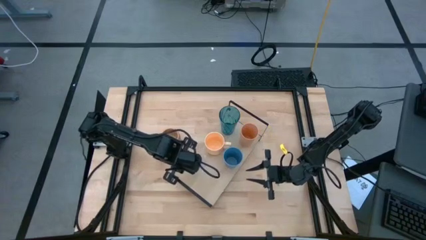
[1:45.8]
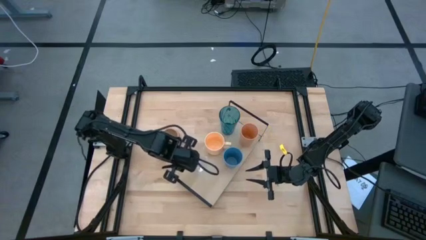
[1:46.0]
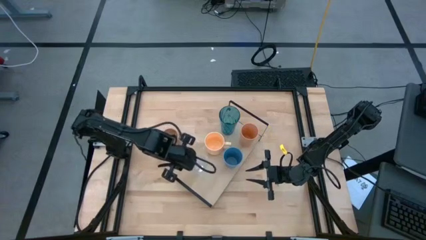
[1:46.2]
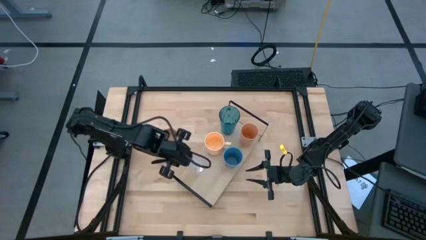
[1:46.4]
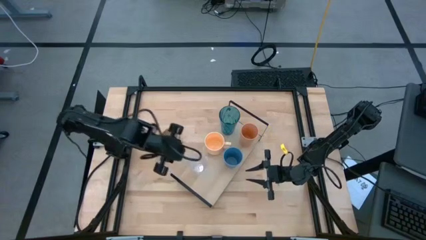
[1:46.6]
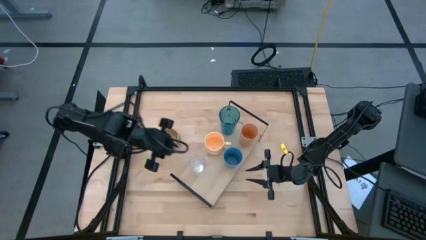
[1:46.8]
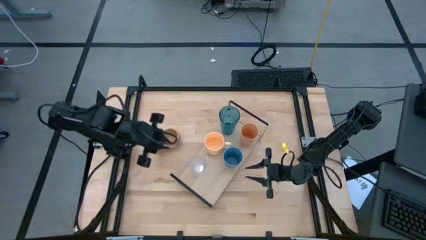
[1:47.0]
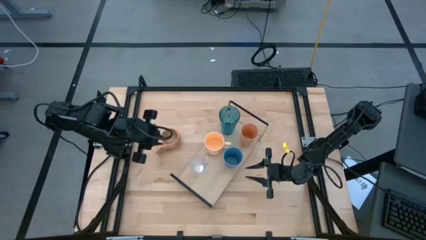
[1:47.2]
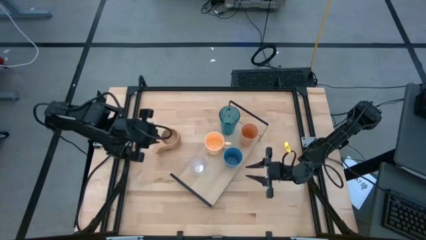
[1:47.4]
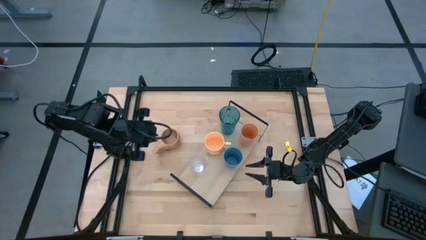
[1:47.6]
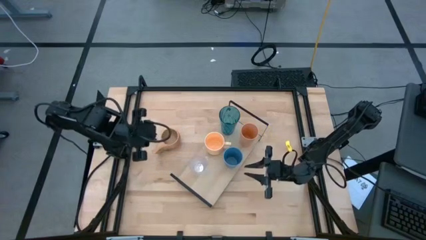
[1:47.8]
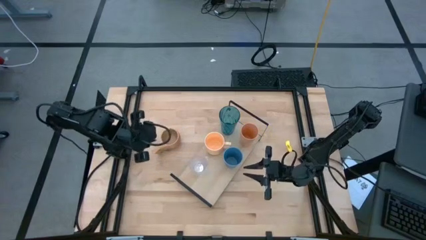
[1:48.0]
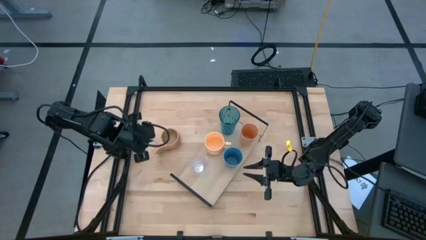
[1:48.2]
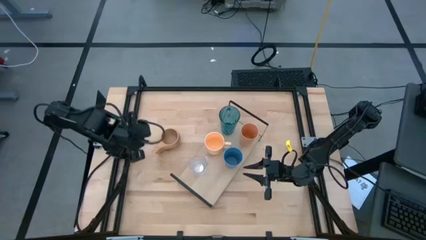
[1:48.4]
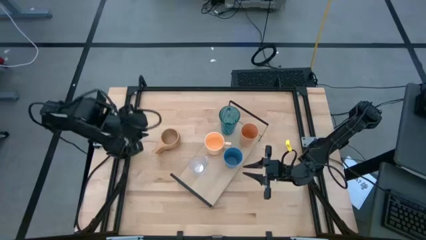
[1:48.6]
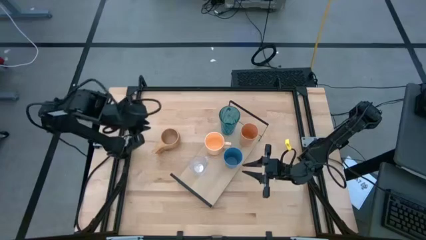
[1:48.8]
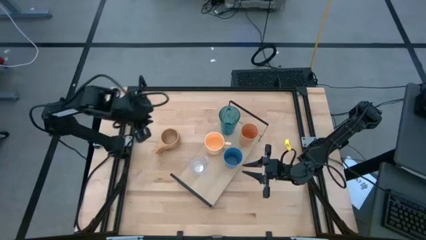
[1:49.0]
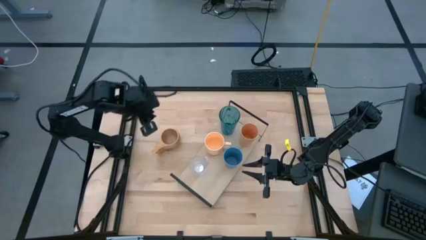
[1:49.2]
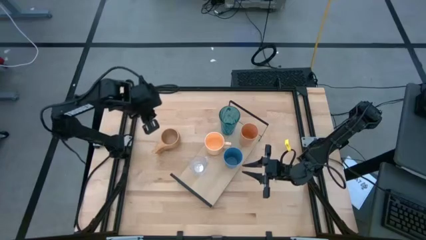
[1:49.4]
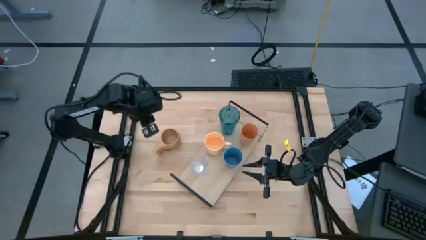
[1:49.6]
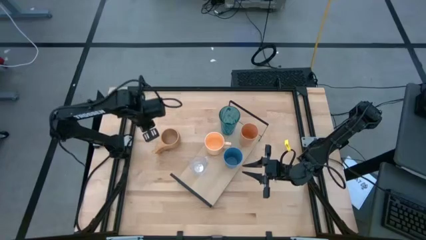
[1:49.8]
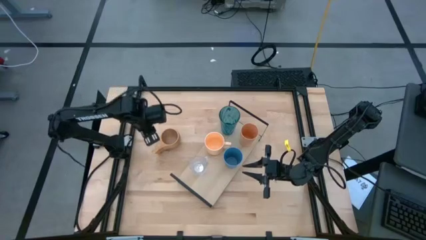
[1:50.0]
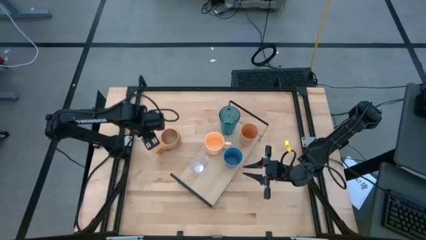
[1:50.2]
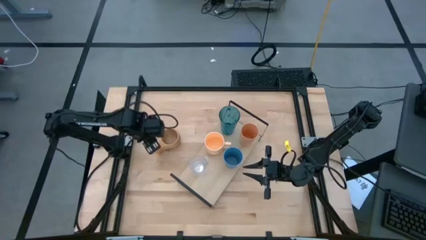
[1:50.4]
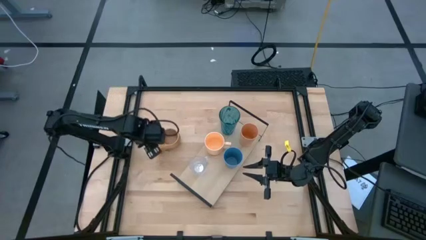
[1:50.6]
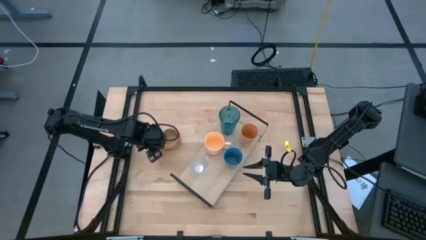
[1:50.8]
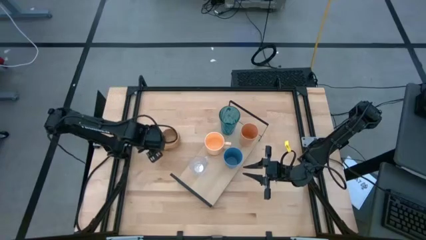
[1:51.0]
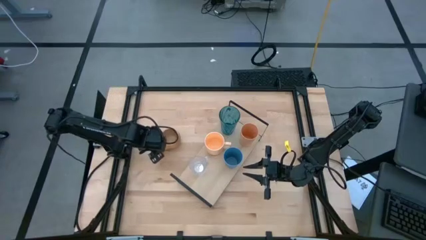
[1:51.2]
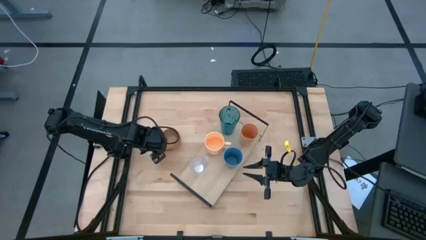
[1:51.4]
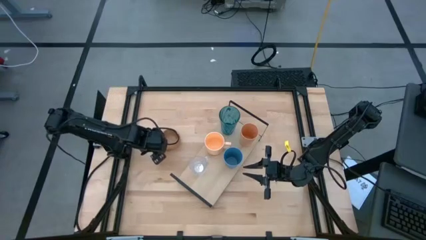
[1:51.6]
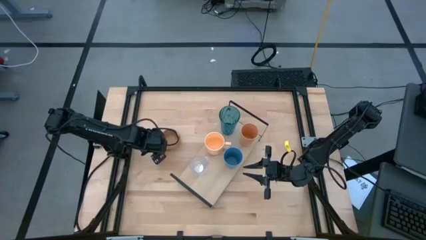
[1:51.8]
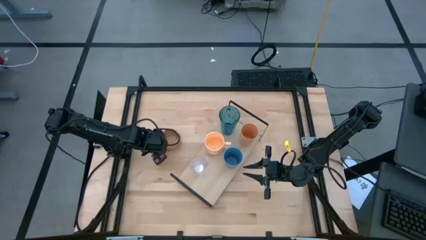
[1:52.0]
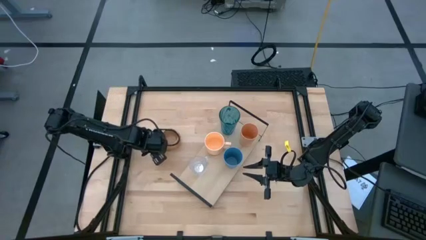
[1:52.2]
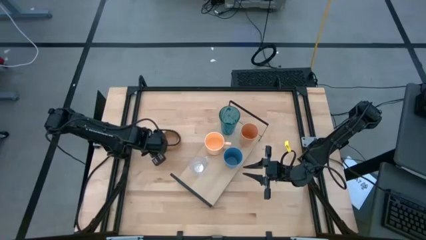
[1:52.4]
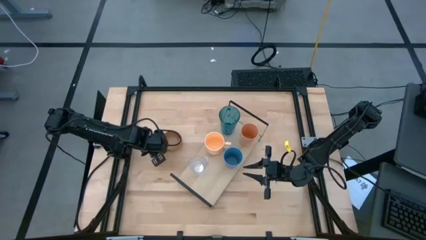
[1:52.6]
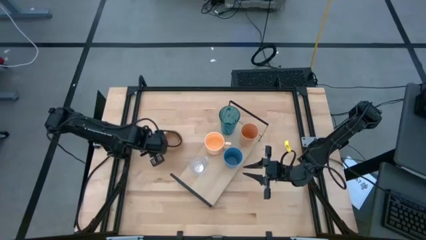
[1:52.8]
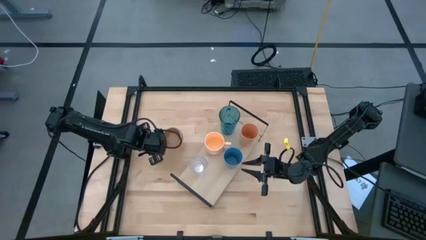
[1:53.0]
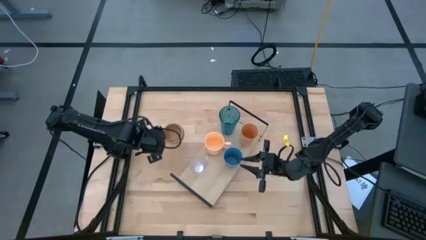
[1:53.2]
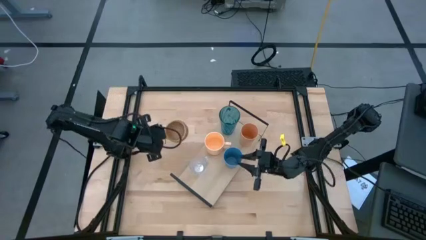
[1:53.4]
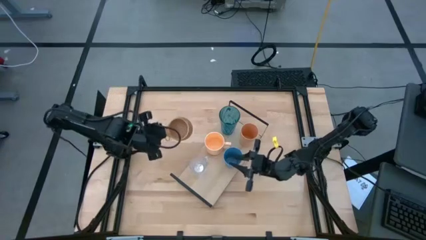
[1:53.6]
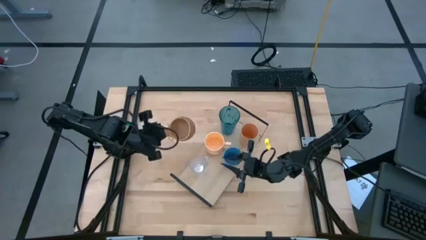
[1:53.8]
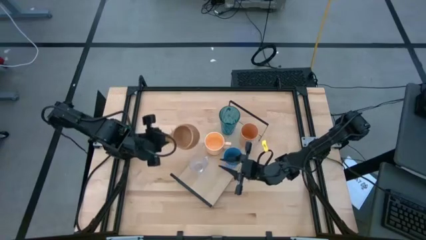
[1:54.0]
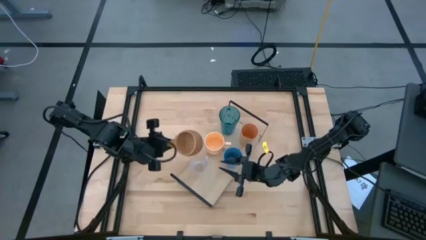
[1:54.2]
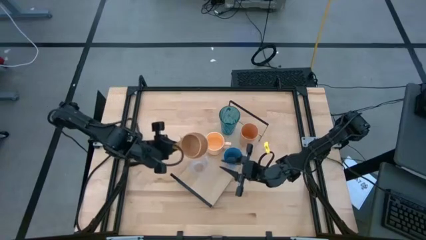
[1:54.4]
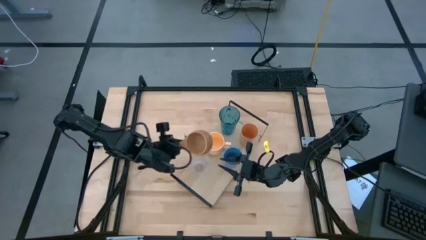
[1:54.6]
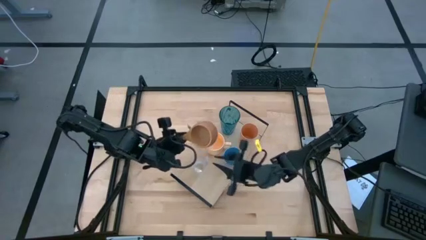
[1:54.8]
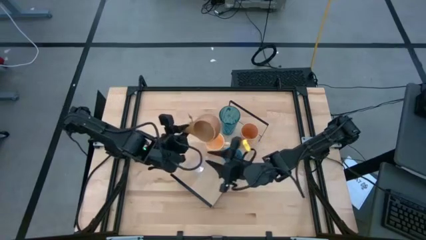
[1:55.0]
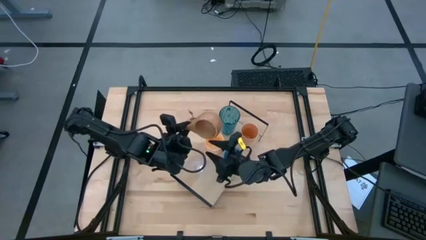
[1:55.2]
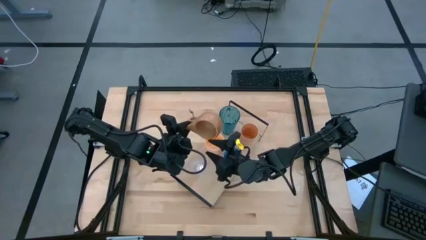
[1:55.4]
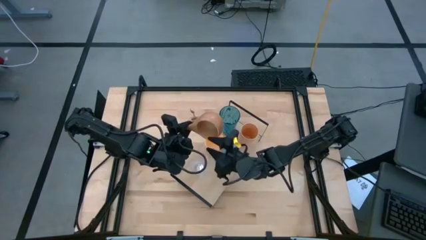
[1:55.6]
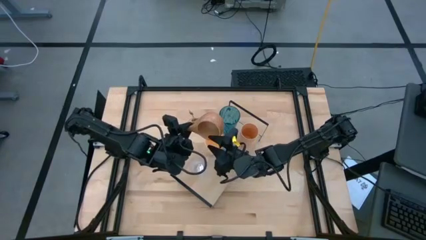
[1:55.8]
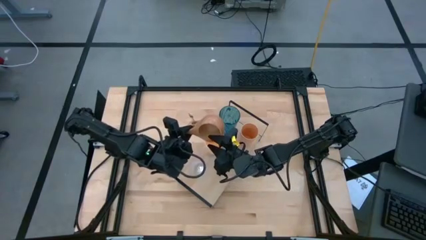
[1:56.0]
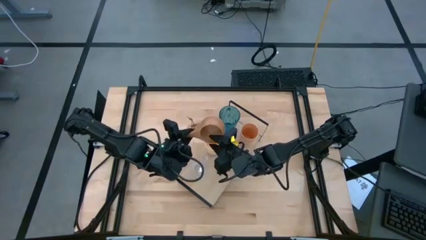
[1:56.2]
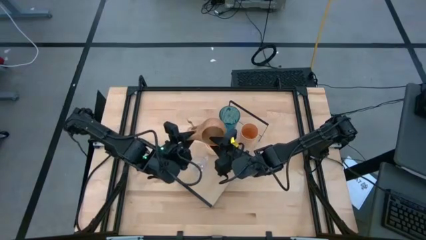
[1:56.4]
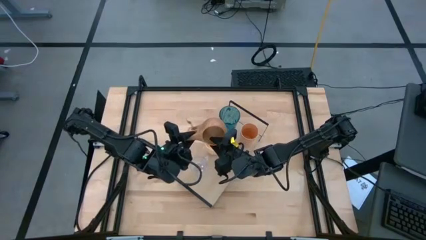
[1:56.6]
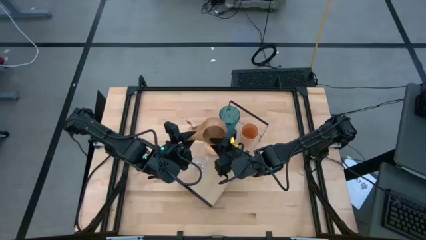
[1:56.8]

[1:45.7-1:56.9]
Task: Stack small to large cups/mugs on shelf
Put the brown wooden mug on the shelf

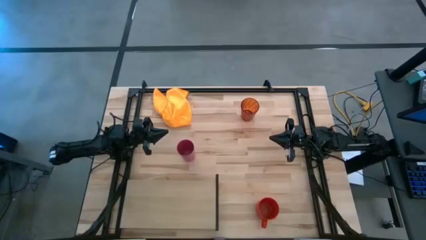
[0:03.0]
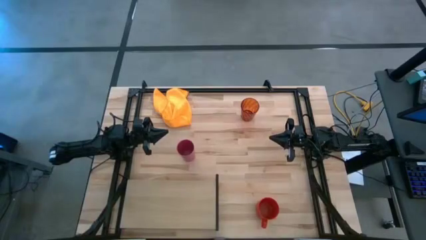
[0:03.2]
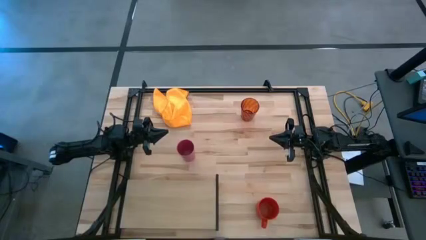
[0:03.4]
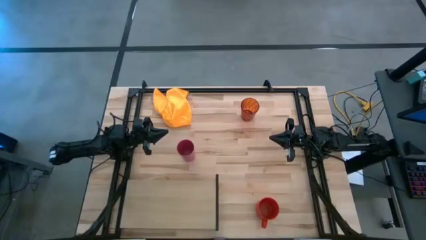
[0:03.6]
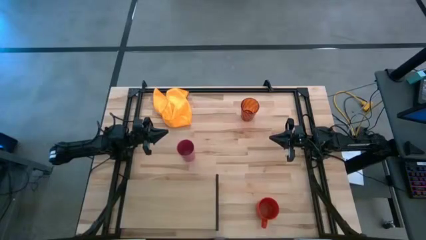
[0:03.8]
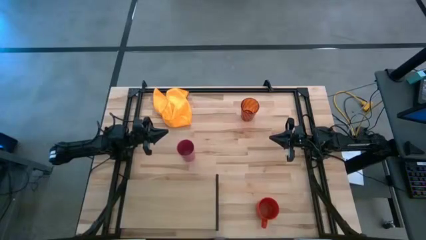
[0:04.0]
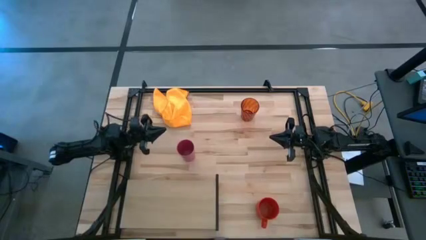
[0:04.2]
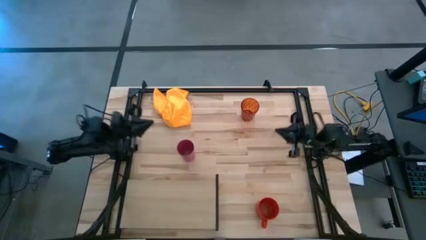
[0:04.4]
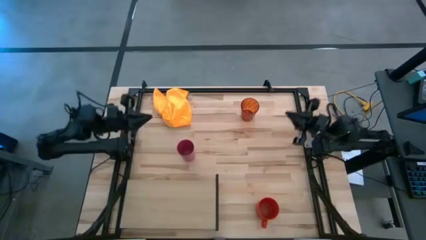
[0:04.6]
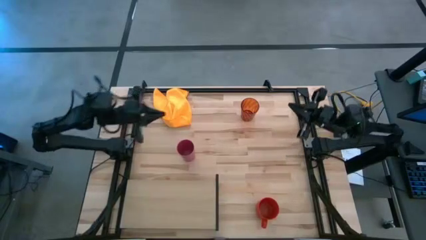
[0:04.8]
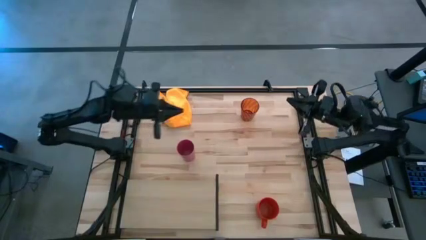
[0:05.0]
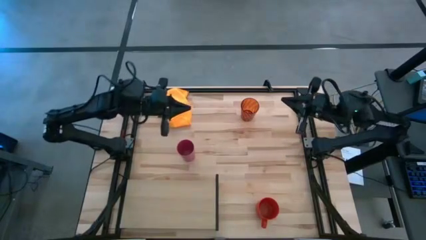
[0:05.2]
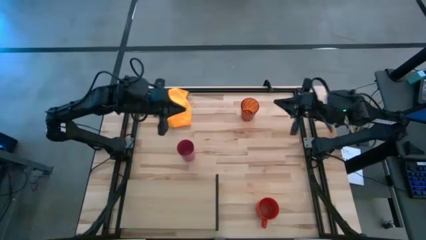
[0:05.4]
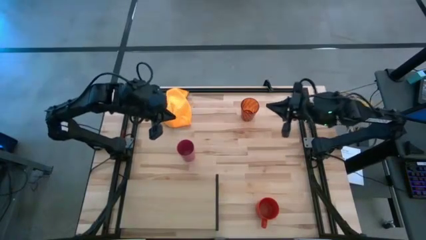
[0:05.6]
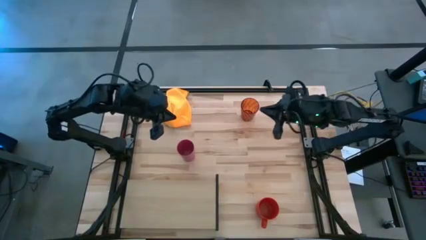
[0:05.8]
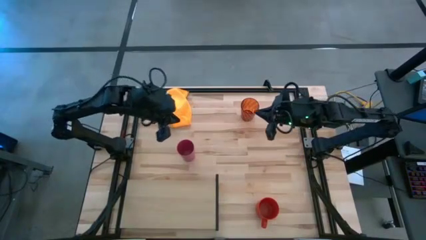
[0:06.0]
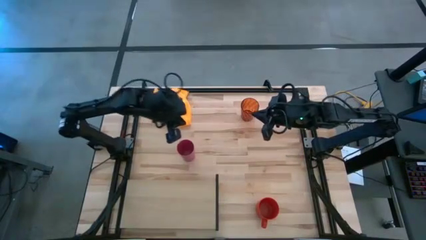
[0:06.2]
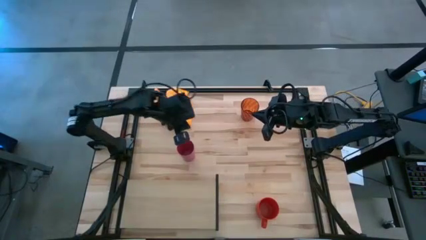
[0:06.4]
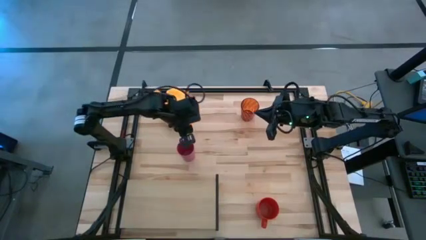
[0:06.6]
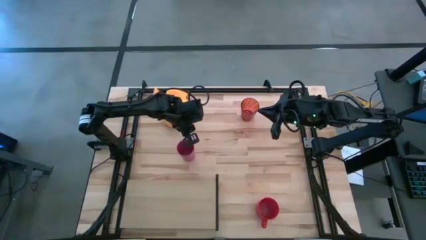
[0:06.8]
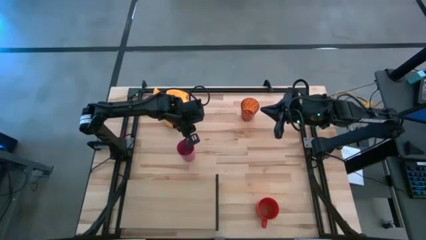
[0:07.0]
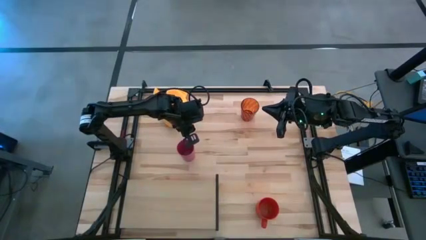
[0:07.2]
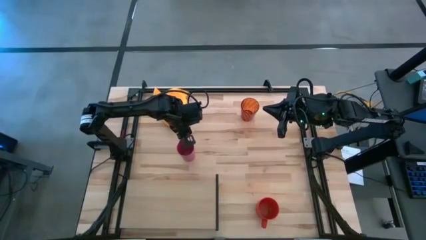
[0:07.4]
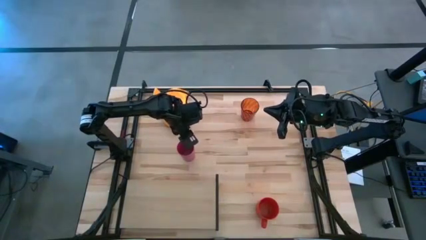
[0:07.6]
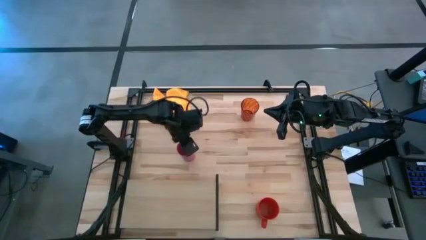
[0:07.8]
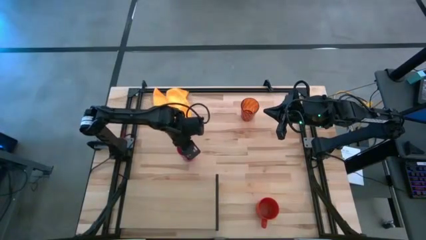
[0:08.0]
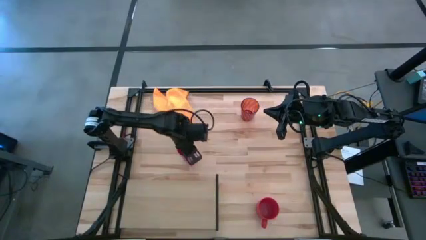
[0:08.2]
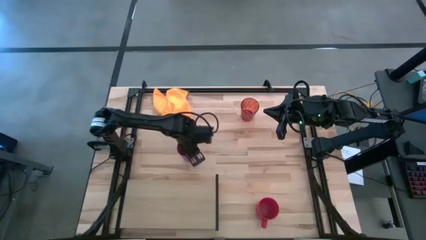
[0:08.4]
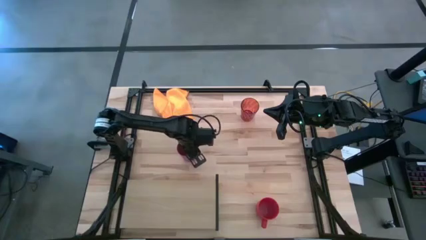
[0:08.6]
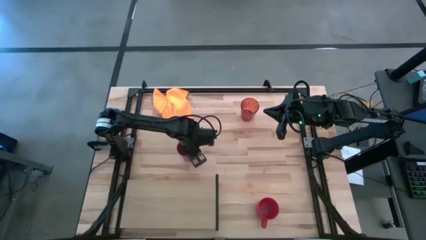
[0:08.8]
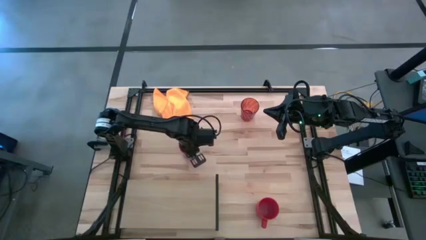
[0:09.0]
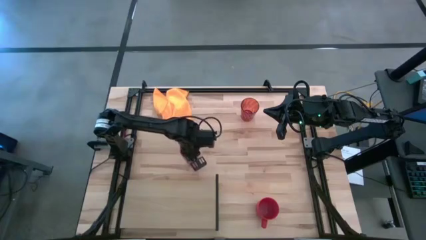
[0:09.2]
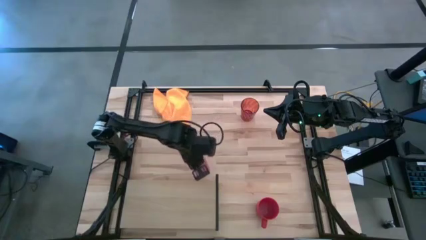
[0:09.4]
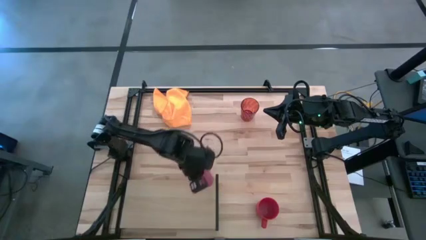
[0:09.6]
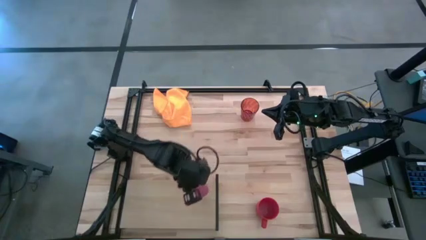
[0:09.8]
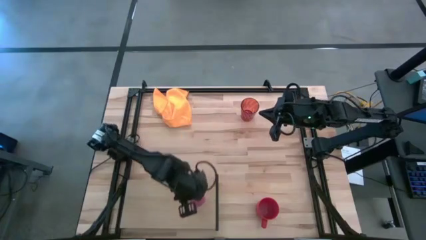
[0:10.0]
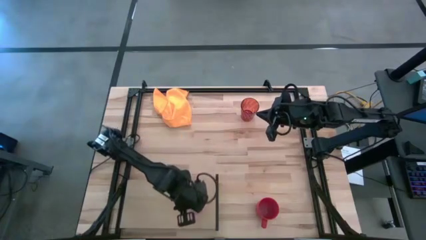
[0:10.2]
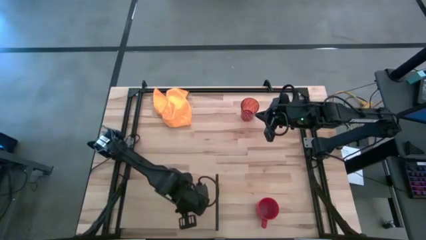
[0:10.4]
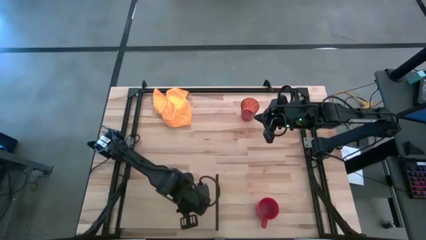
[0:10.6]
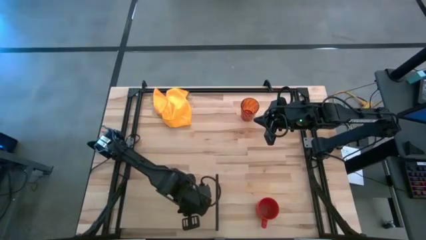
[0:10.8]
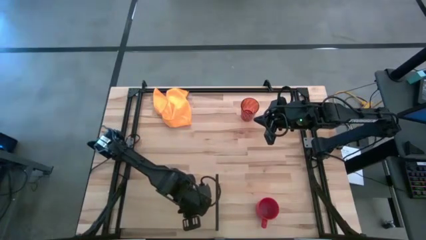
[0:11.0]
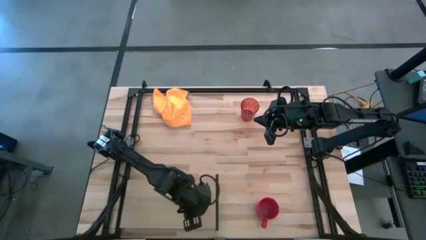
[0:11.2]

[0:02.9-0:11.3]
Task: Stack small to large cups/mugs on shelf
Put the pink cup on the shelf
